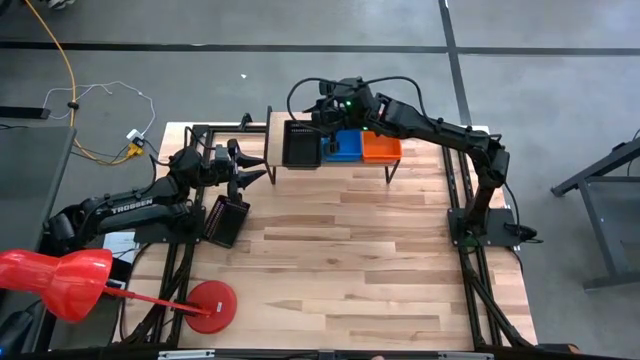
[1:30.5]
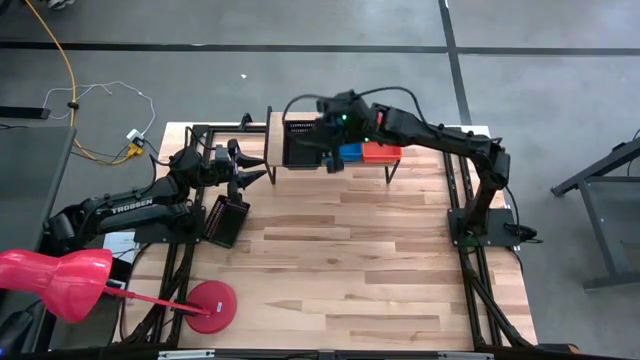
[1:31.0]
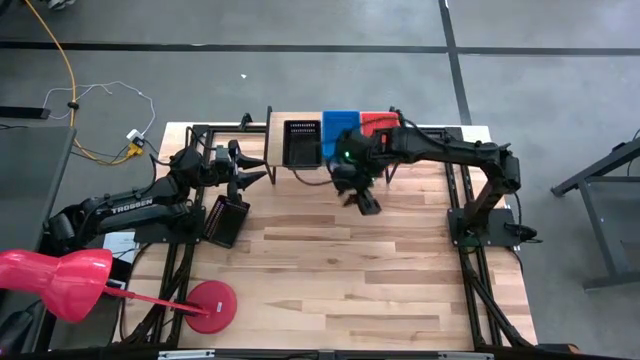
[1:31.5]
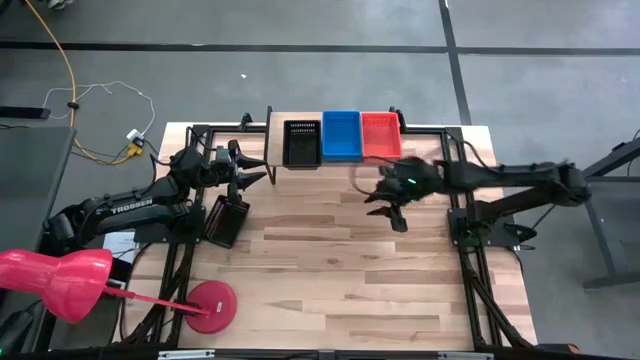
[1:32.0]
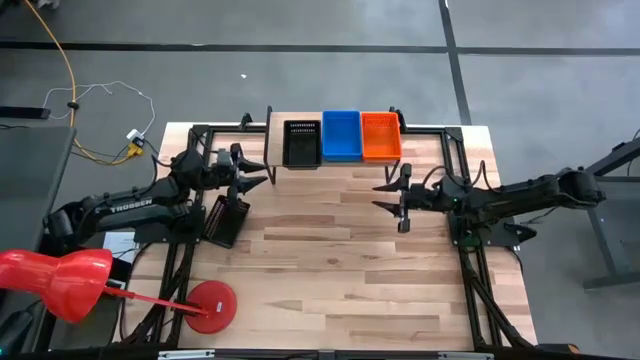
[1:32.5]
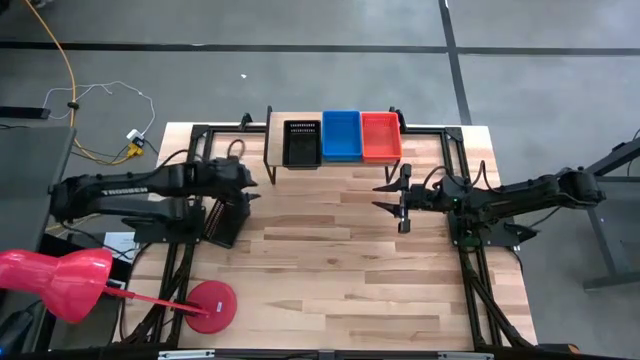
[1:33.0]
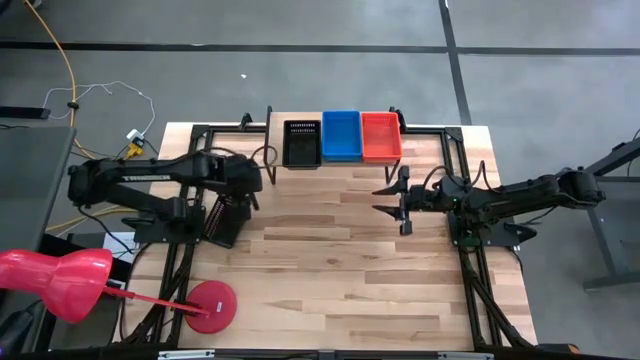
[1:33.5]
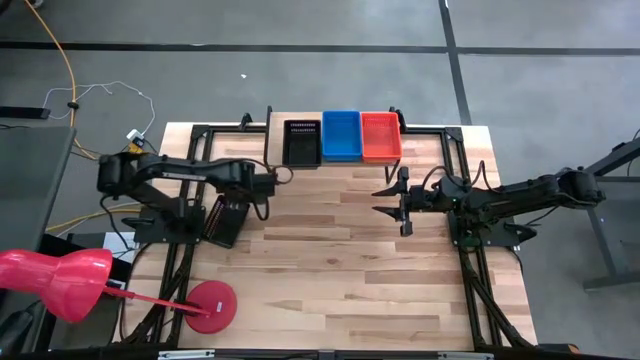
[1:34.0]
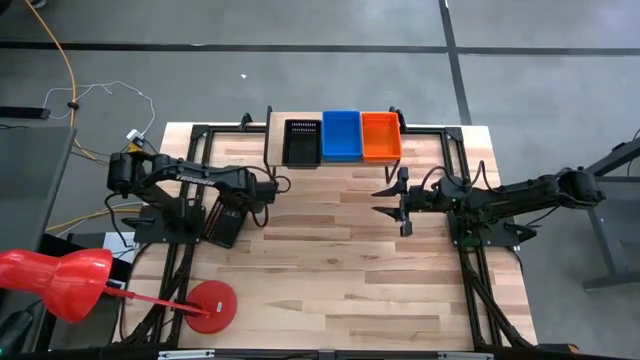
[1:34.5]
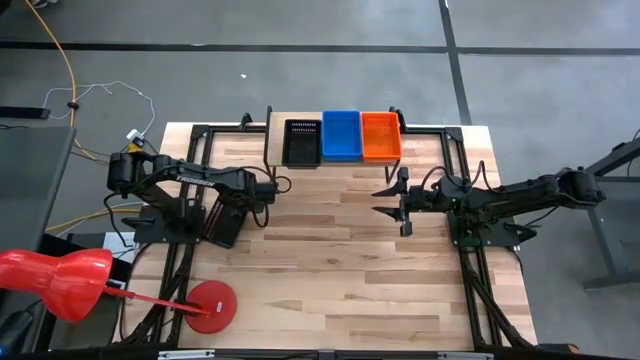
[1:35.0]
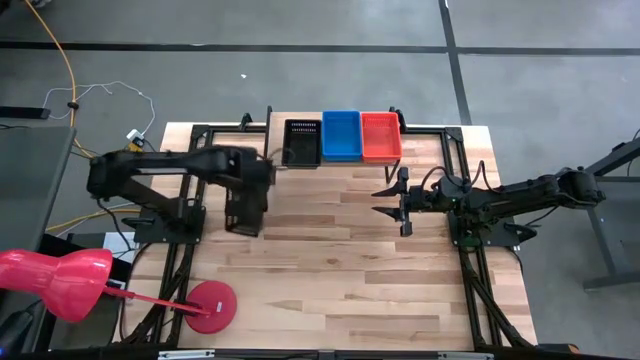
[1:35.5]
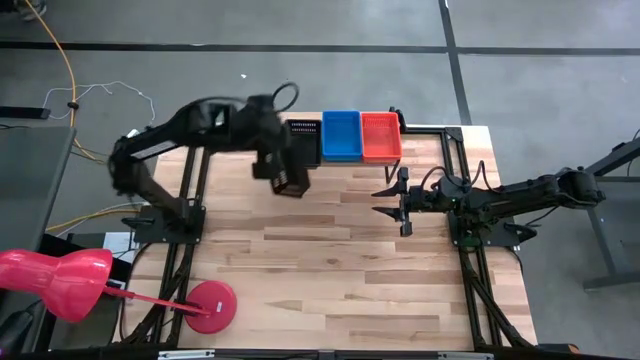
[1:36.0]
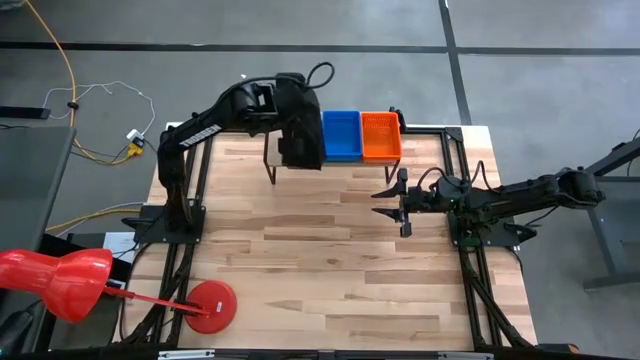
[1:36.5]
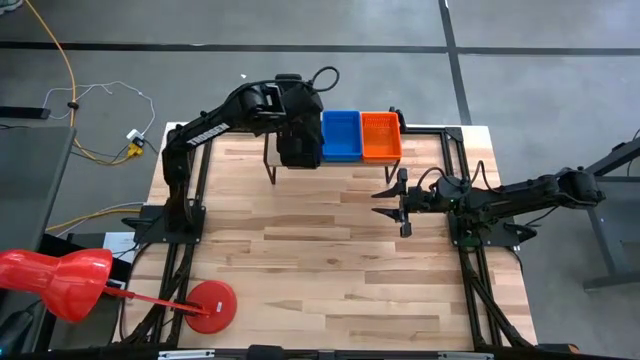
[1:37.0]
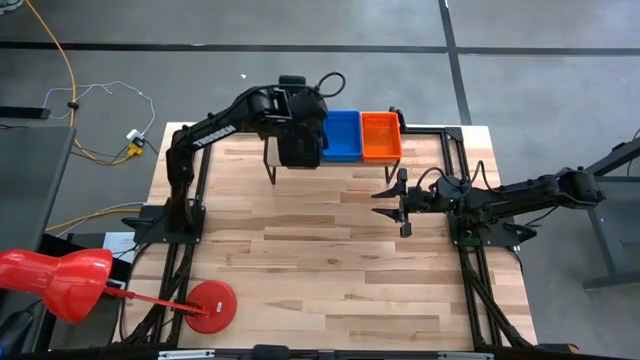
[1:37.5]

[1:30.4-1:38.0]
Task: Stack baskets on shelf by color
Stack the black basket on the other black baskets on the shelf

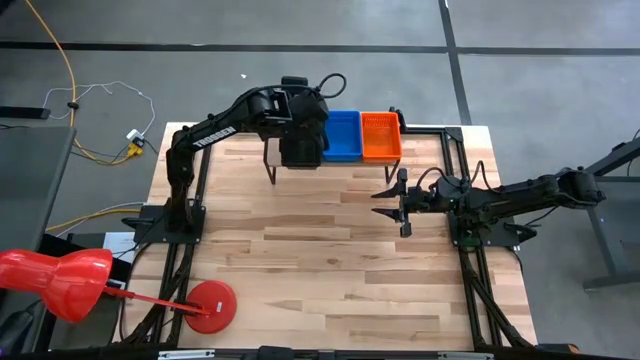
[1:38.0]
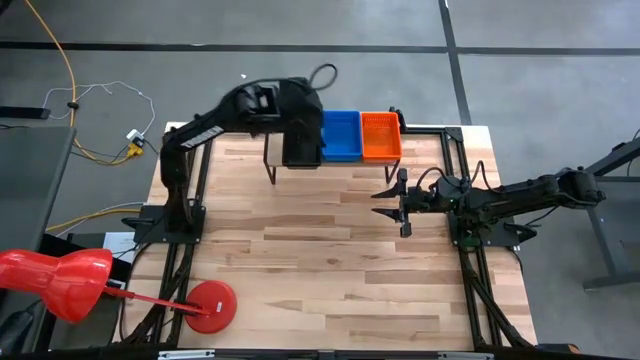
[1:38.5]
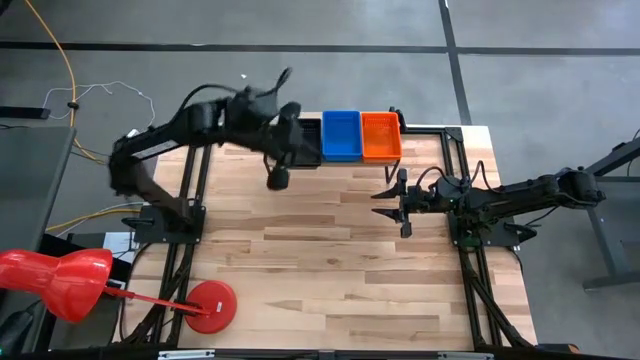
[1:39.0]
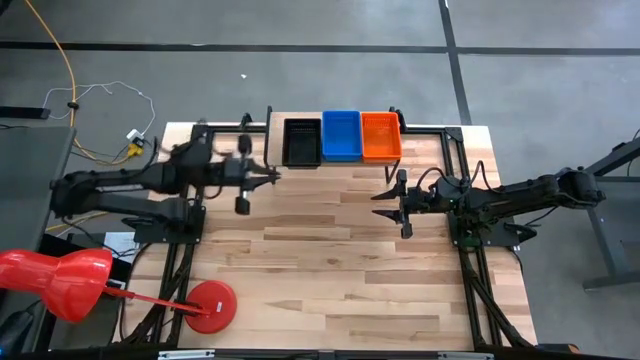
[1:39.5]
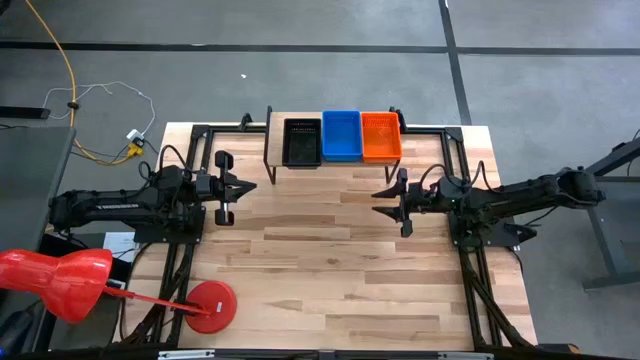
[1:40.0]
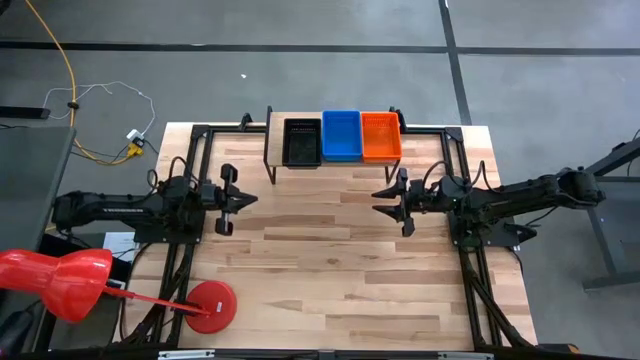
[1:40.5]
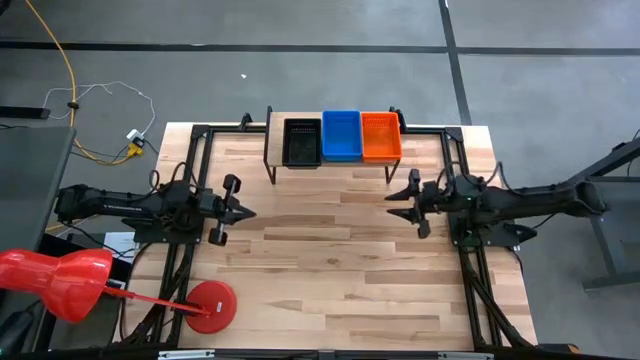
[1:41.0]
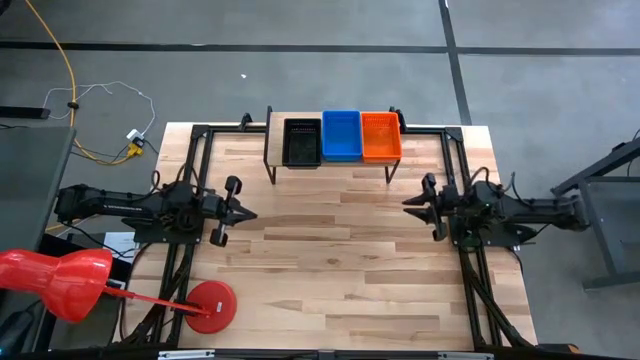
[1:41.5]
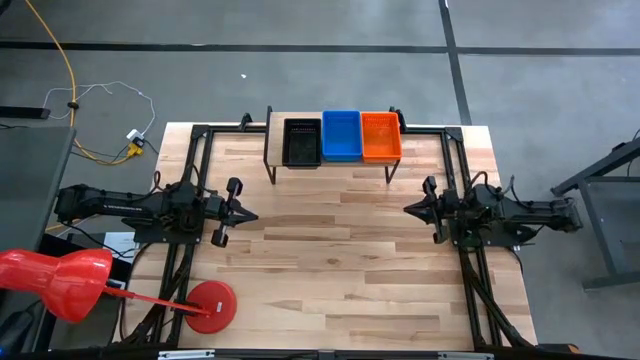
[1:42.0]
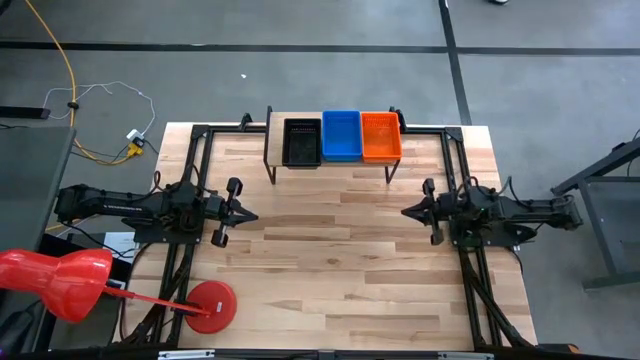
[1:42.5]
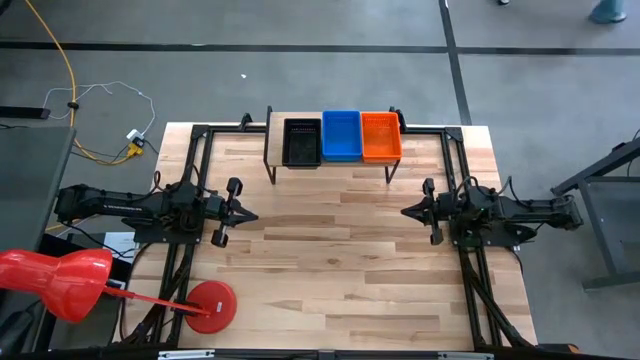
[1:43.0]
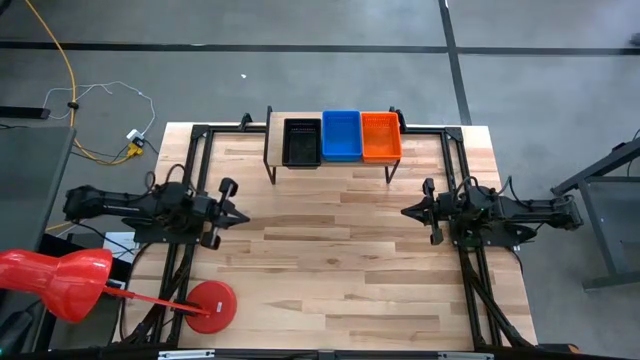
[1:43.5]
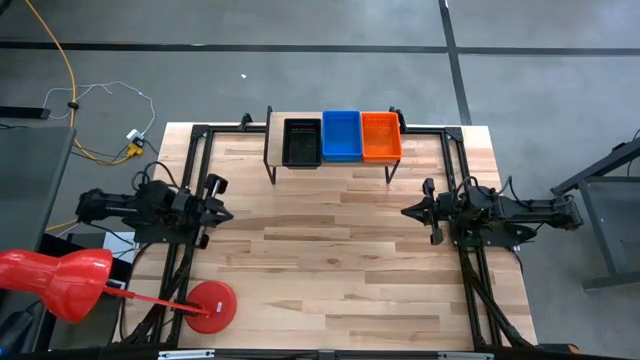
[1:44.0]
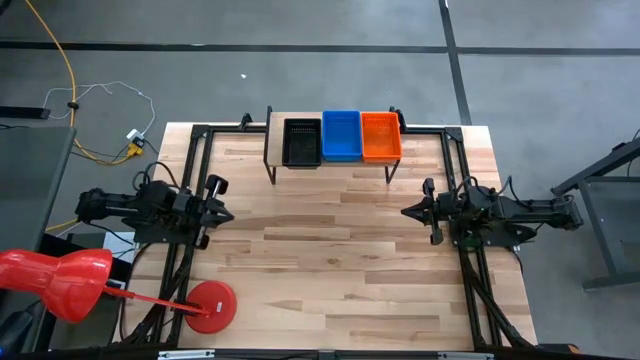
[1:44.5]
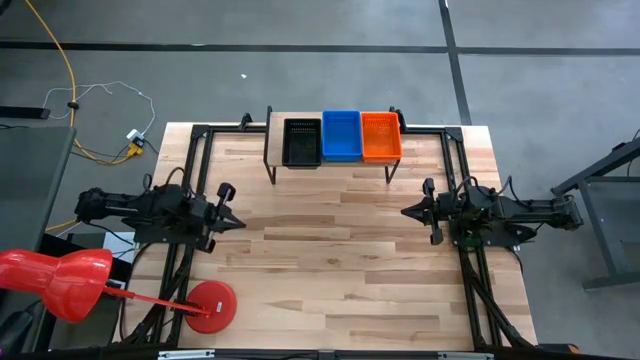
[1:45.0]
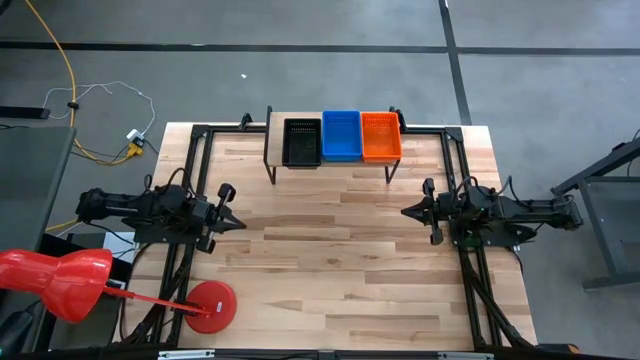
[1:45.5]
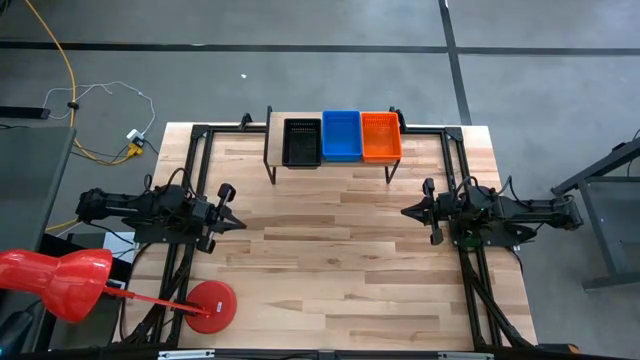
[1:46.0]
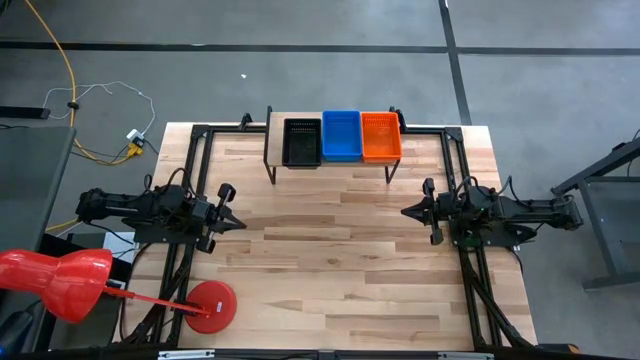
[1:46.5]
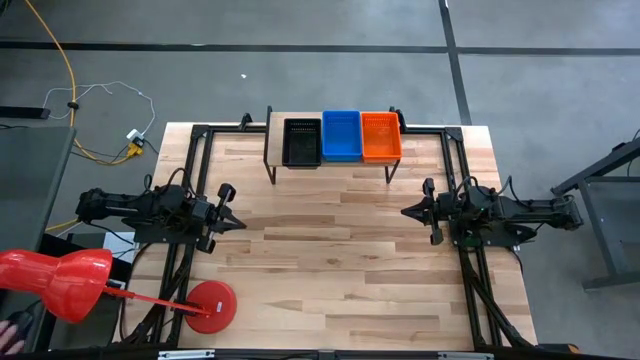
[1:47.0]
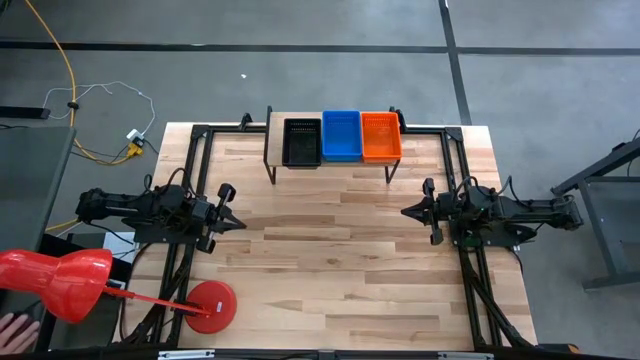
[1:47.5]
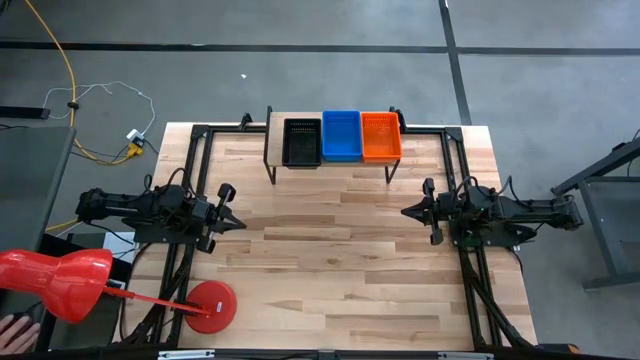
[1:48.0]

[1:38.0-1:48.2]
Return to Home Position

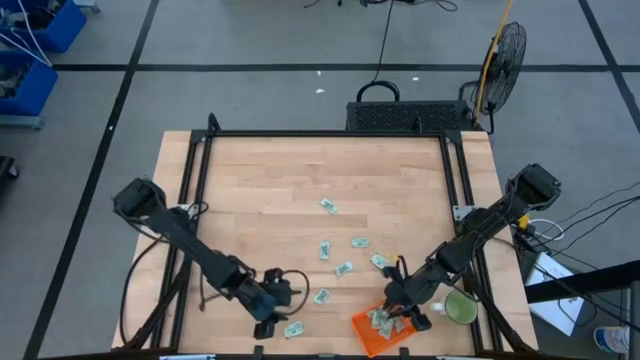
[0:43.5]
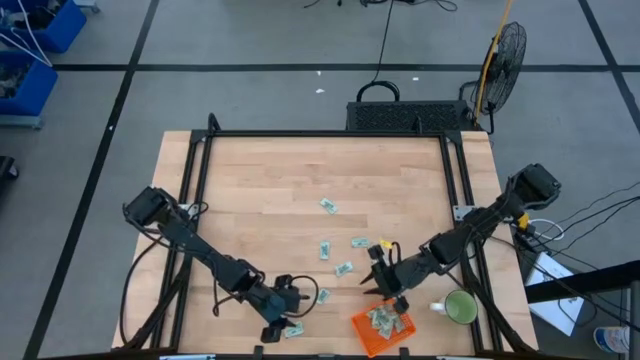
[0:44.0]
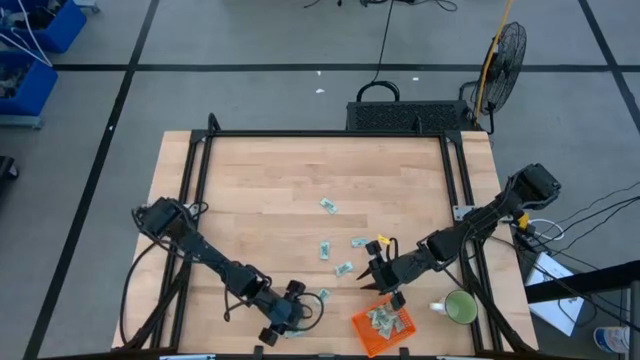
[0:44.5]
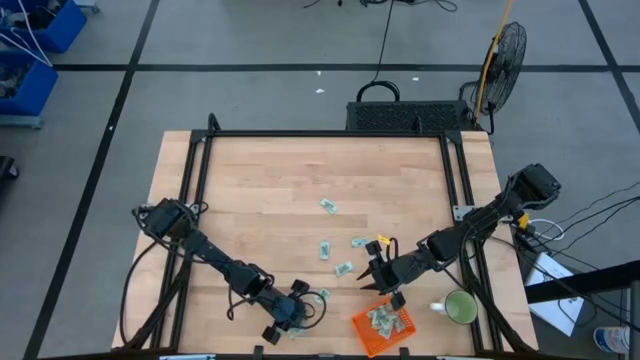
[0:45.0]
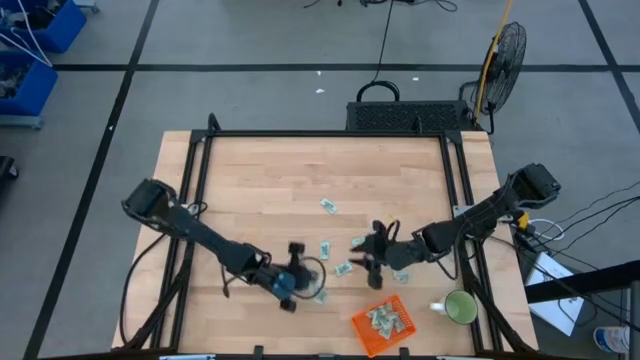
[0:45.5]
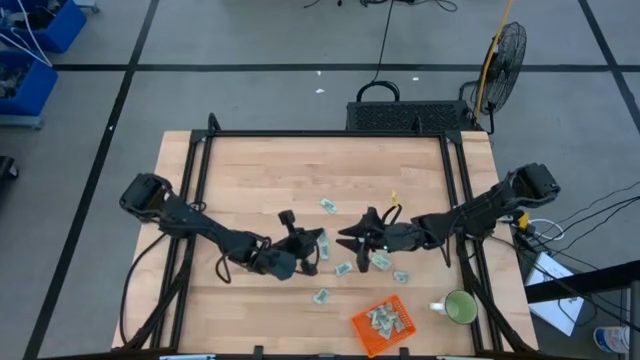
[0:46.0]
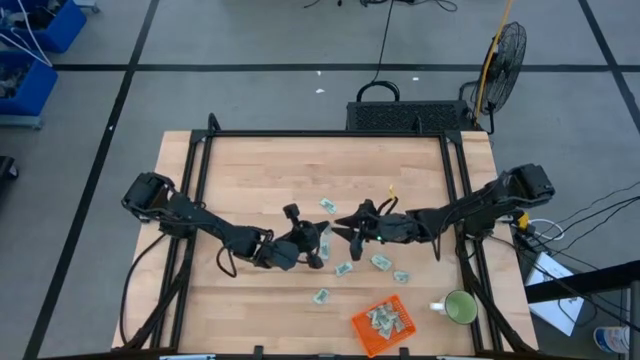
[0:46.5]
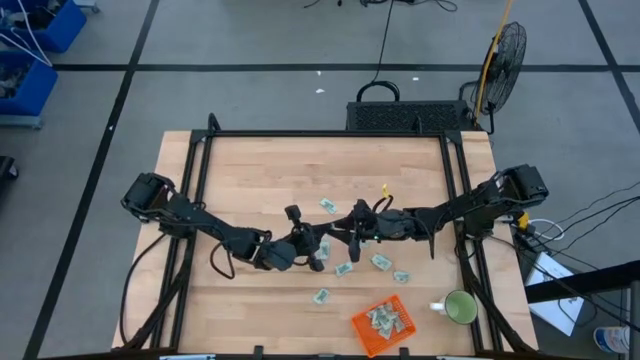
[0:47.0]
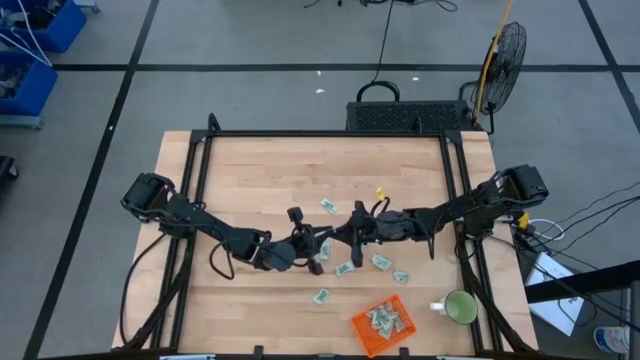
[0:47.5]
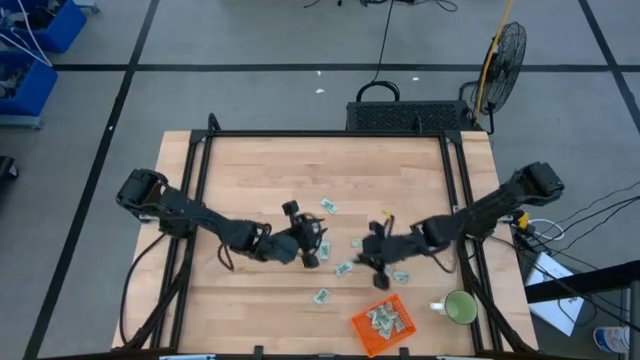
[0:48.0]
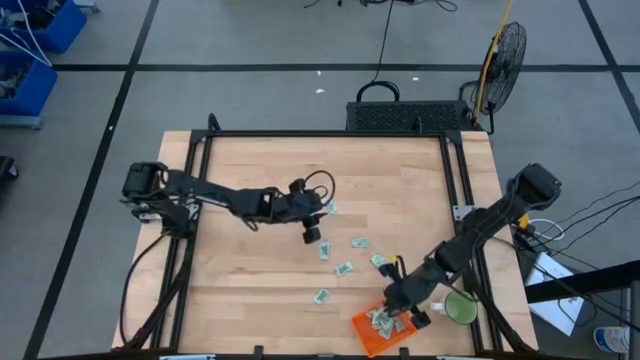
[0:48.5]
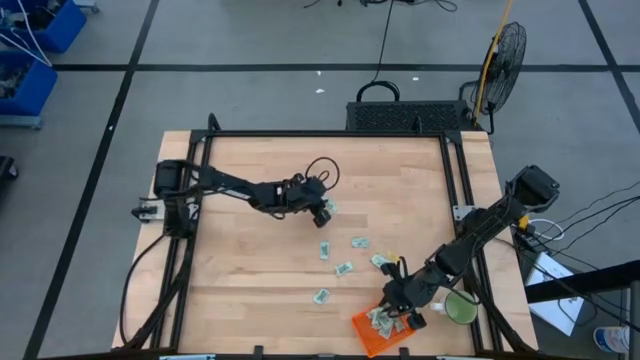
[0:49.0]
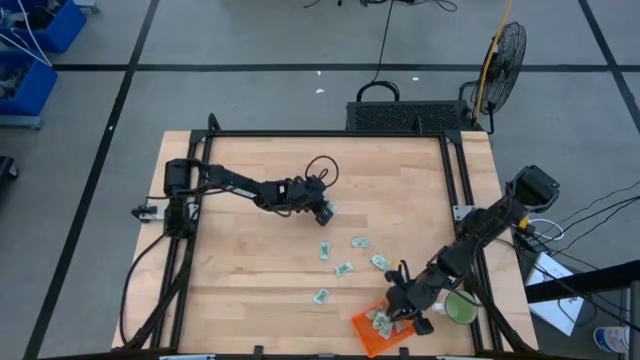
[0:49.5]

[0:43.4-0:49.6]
Task: Pick and place Stevia / Truvia into bins
Put the stevia packet into the orange bin
